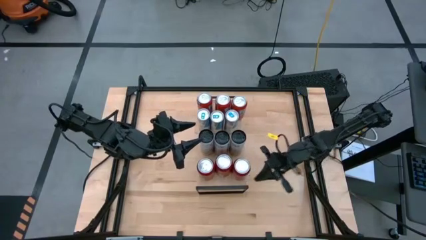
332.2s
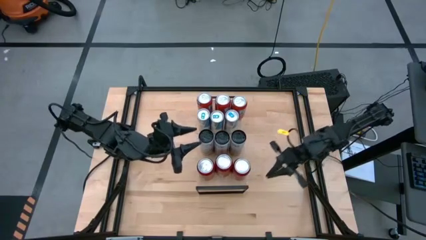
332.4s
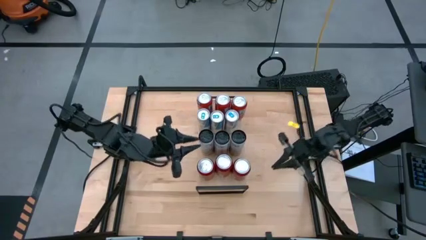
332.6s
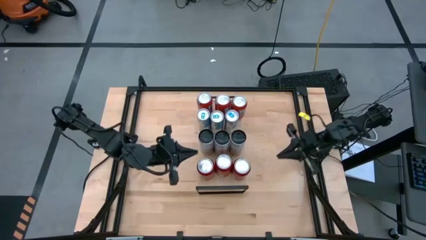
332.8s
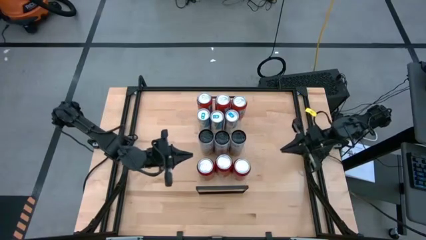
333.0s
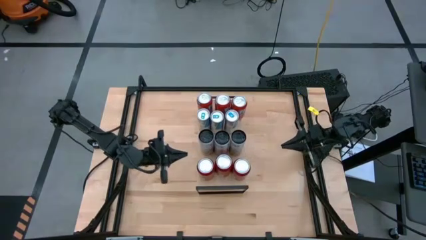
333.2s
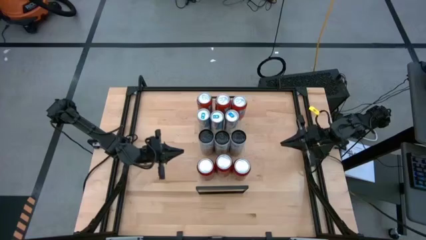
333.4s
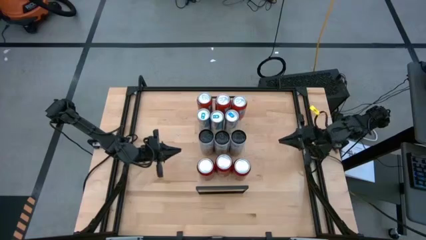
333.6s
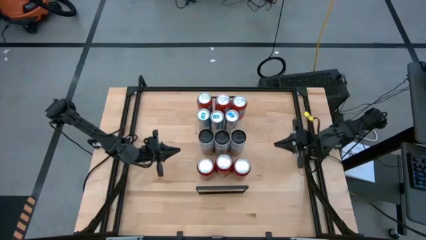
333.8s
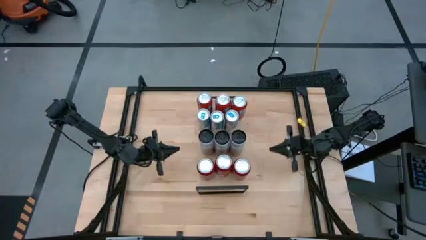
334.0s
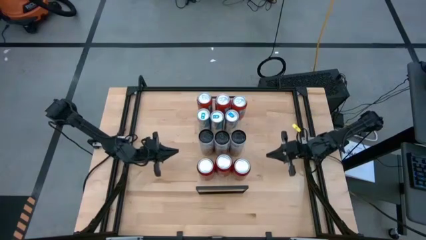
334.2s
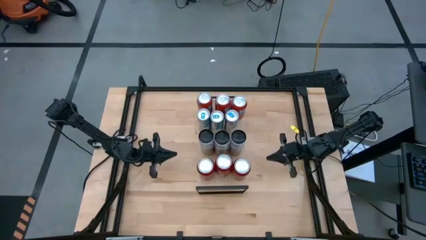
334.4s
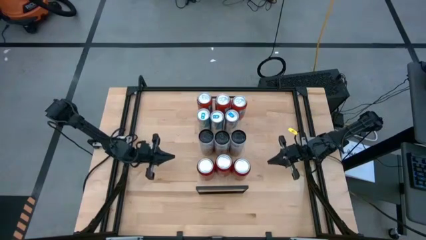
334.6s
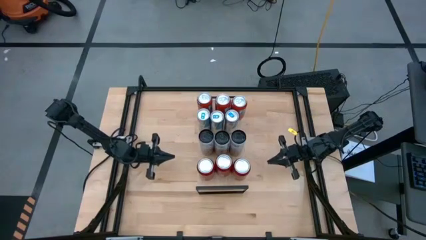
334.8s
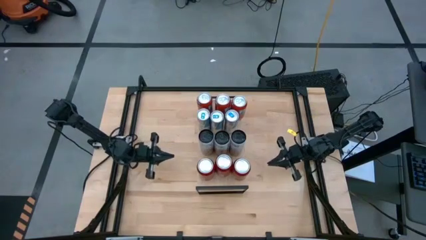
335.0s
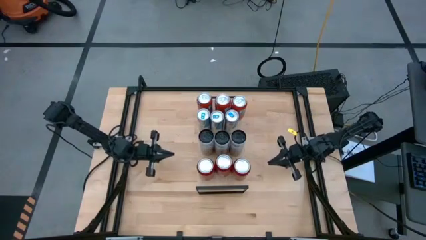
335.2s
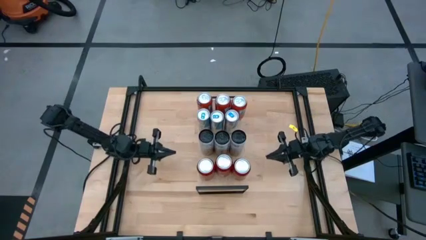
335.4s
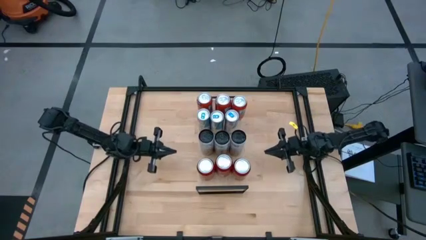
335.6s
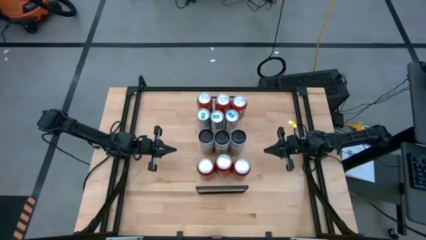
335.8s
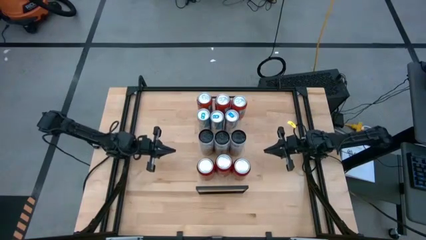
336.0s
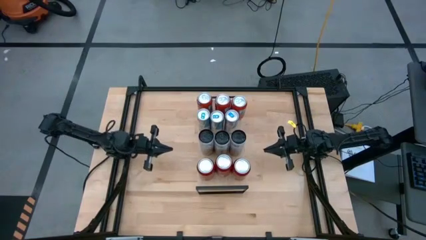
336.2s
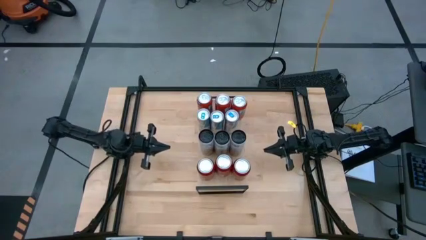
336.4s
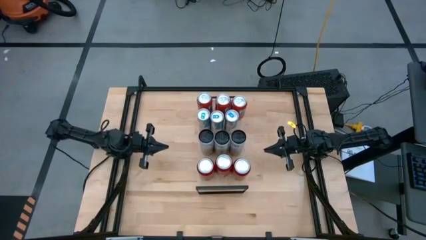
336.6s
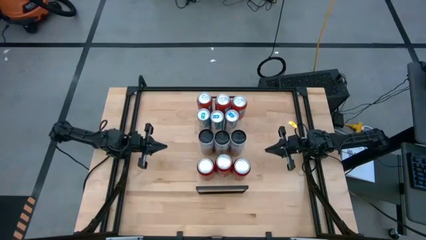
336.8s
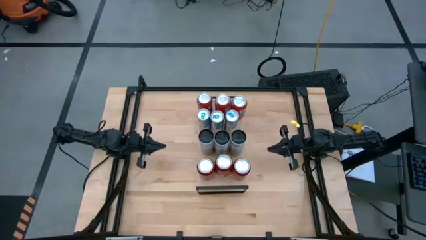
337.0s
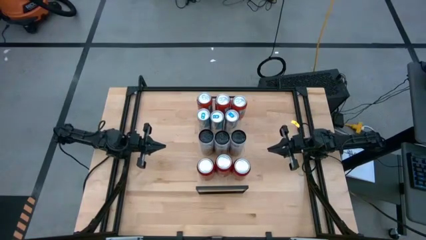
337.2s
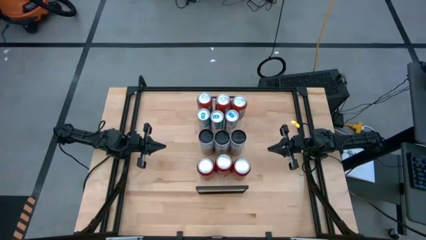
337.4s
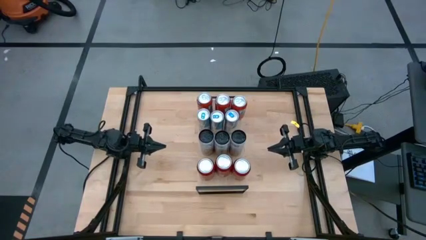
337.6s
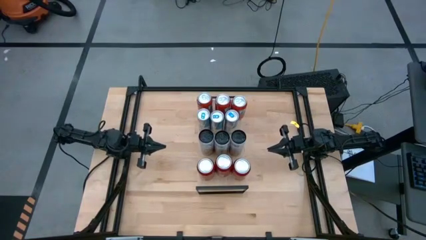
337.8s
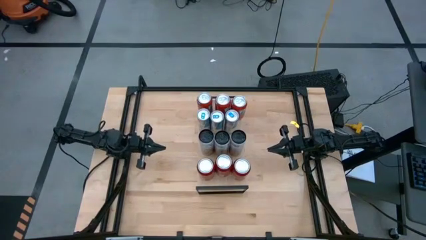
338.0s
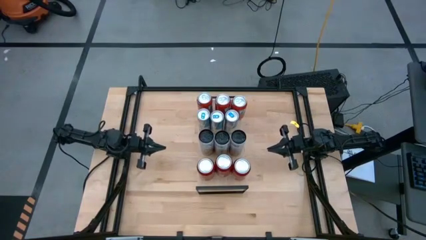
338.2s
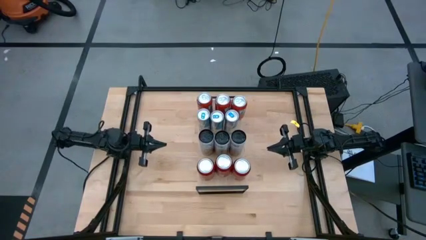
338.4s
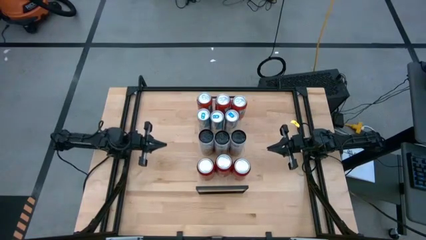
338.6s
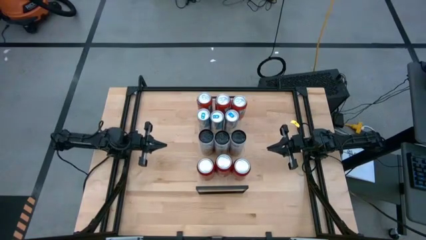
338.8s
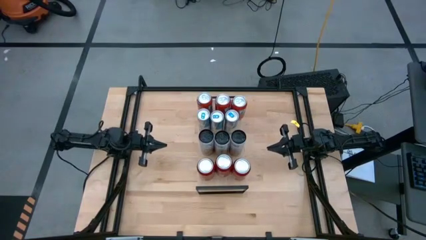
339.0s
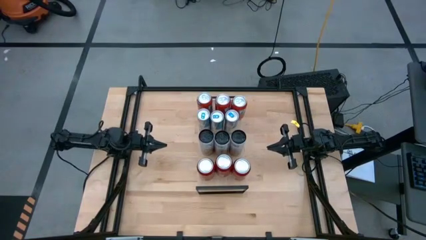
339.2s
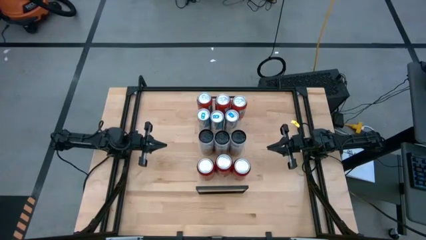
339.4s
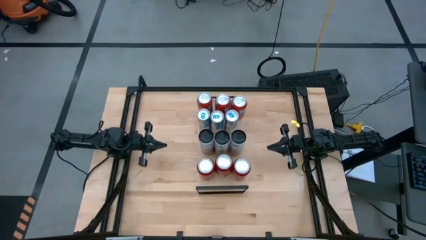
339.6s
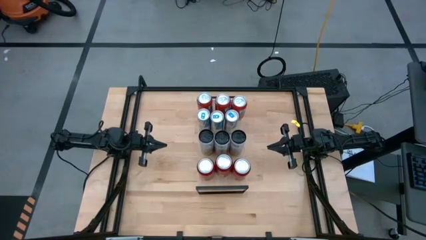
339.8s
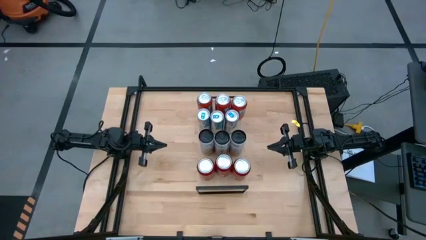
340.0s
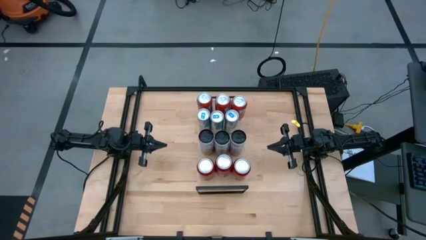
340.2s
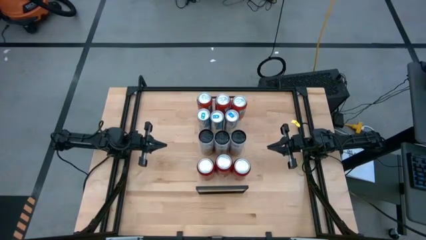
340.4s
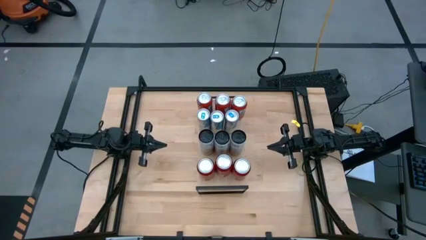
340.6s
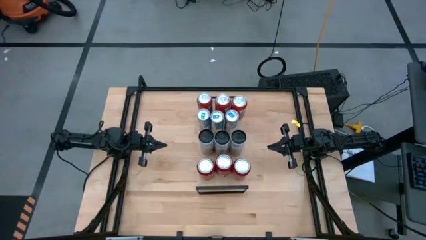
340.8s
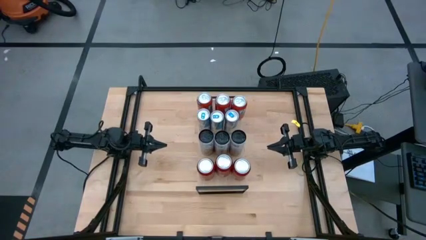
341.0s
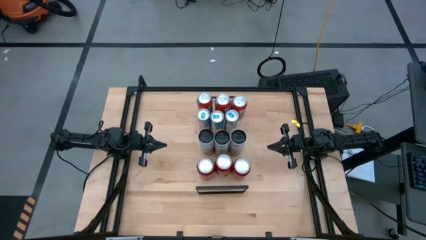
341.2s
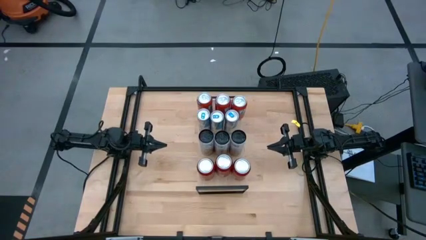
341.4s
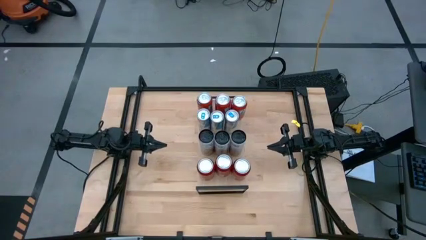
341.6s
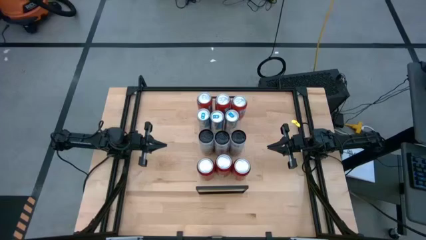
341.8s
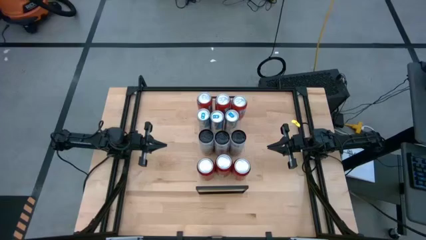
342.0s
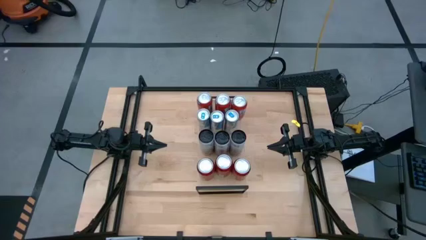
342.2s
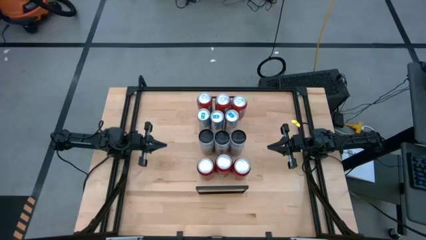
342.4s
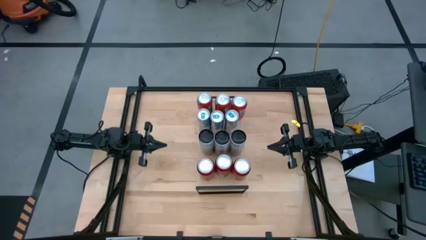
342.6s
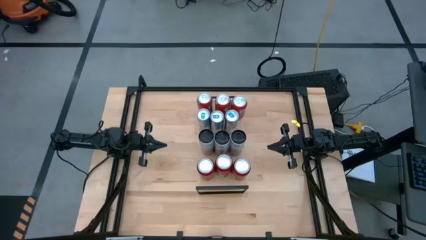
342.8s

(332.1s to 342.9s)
Task: Place canned beverage on shelf
Return to Home Position
